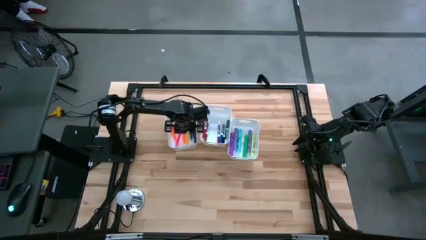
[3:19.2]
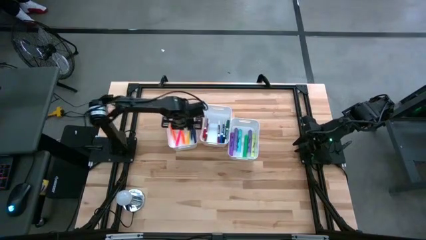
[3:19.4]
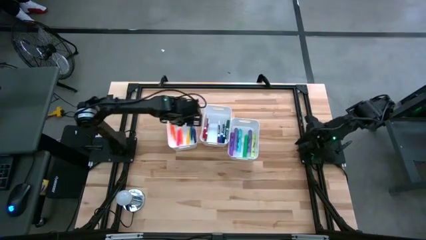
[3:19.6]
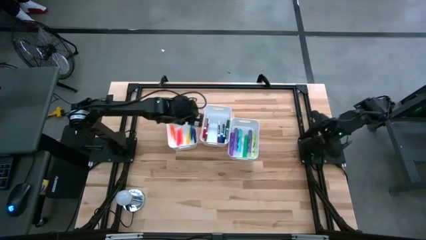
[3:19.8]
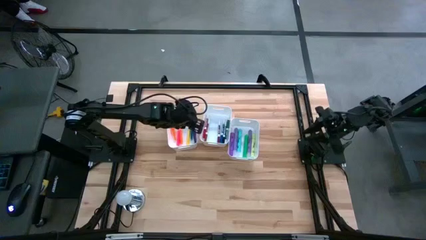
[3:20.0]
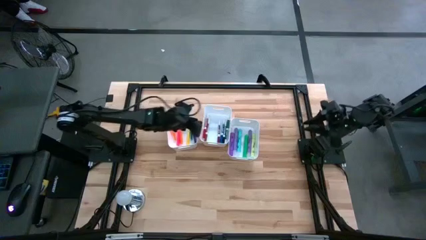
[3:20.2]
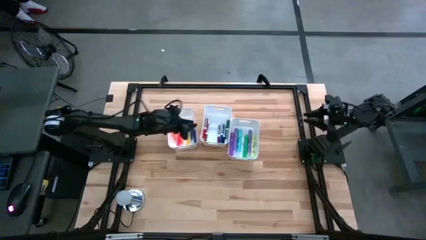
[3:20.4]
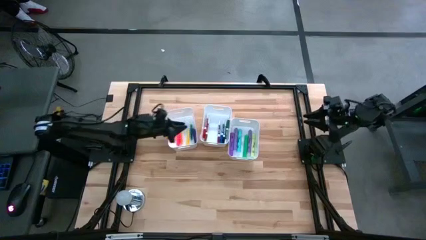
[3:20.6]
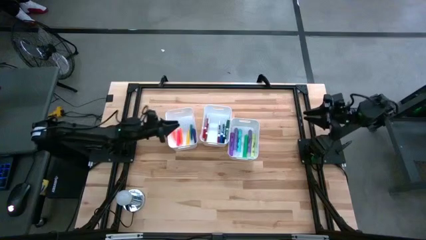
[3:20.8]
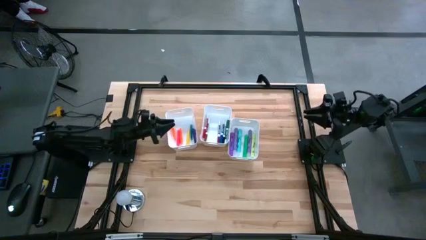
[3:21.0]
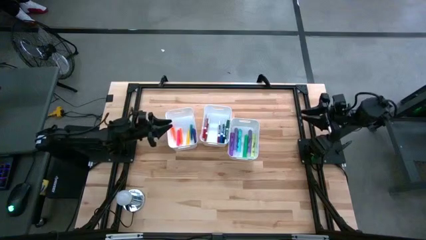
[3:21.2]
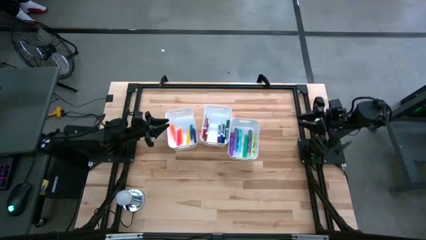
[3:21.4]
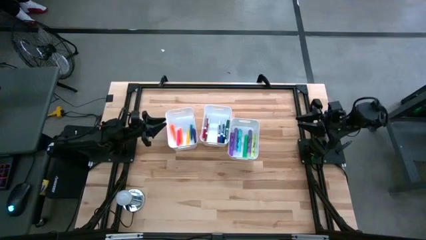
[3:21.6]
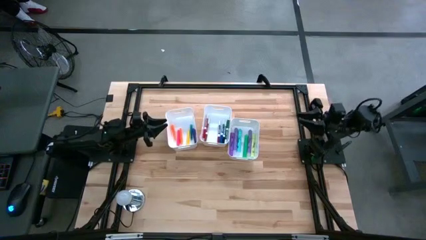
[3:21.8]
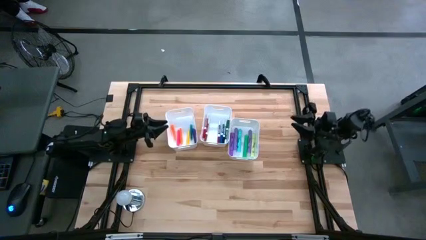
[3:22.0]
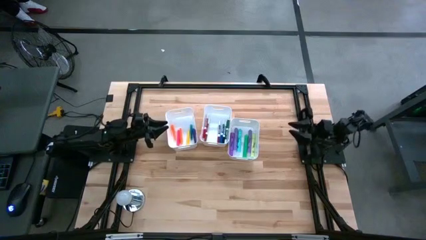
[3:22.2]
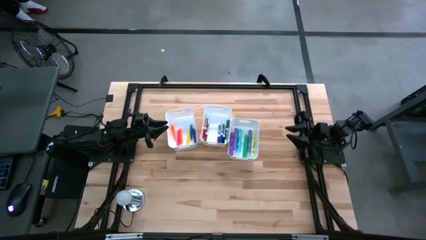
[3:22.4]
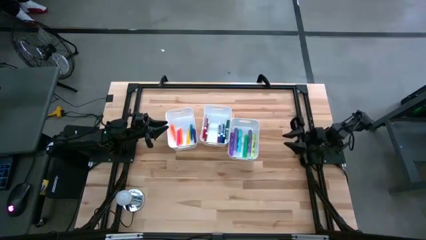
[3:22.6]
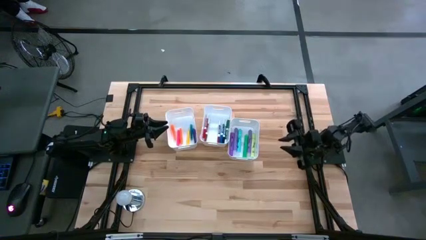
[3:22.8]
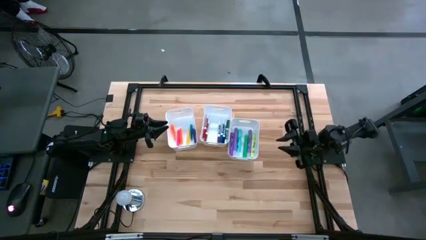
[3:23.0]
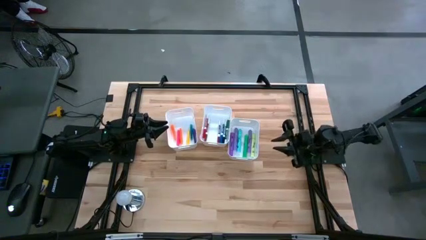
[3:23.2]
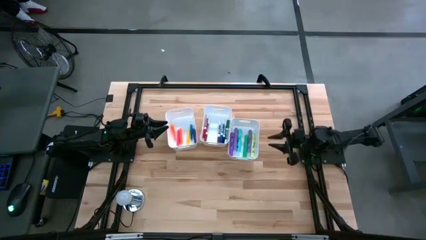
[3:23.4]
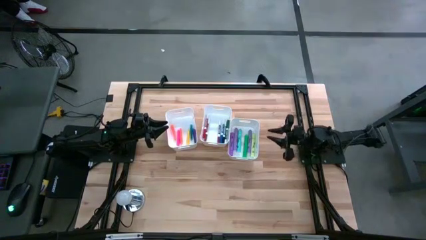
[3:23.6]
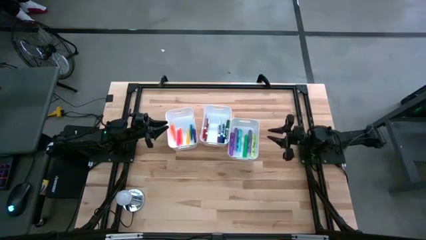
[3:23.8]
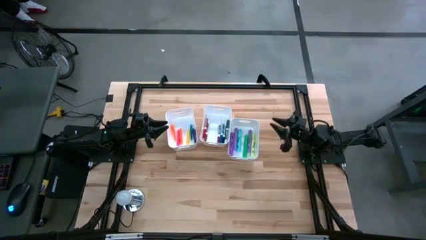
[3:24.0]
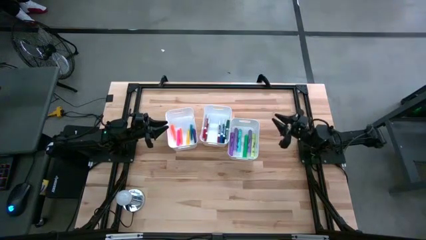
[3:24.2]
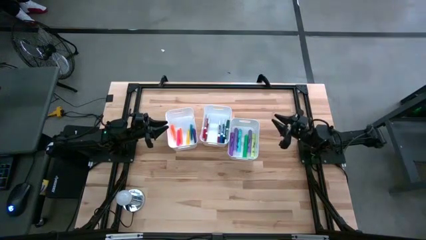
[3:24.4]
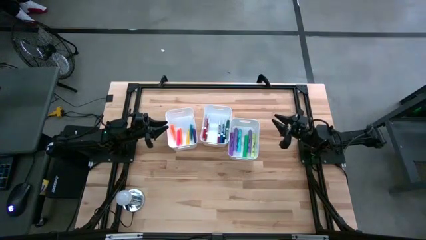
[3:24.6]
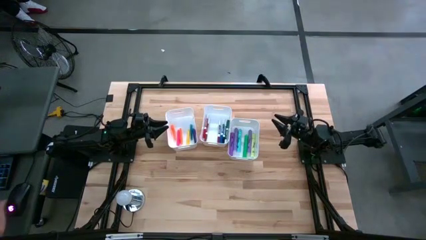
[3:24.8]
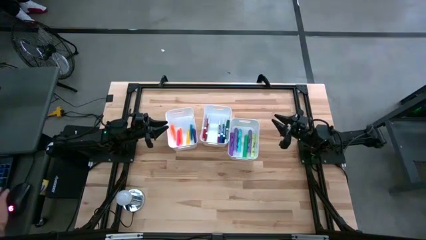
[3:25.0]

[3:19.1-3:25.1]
Task: Pick & Place Markers
Return to Home Position

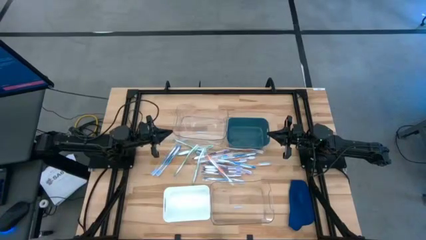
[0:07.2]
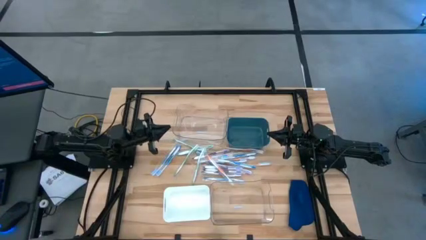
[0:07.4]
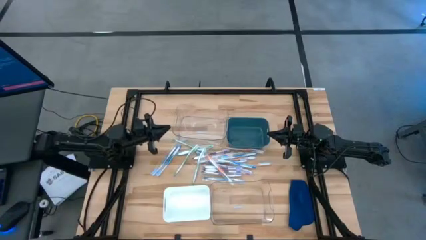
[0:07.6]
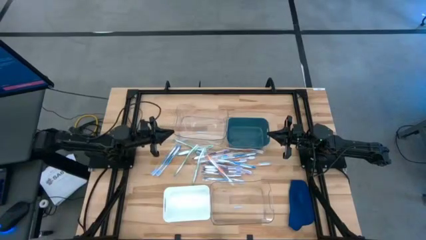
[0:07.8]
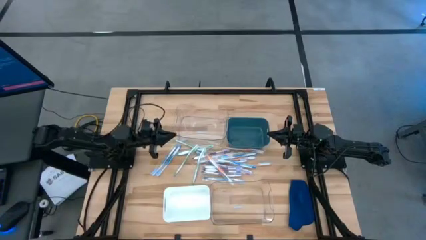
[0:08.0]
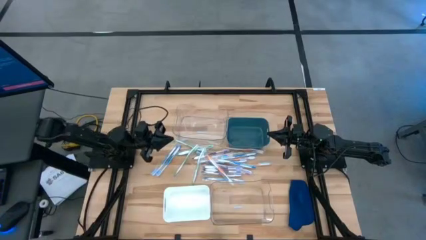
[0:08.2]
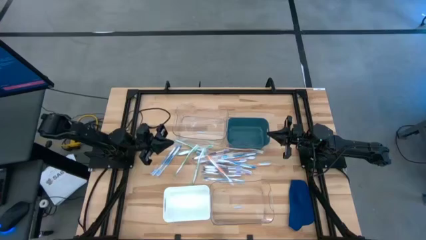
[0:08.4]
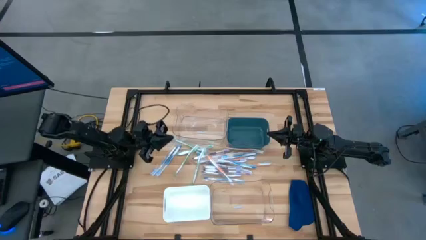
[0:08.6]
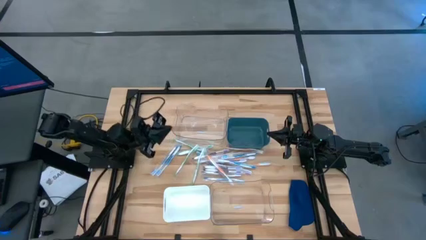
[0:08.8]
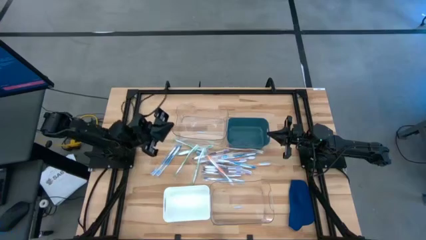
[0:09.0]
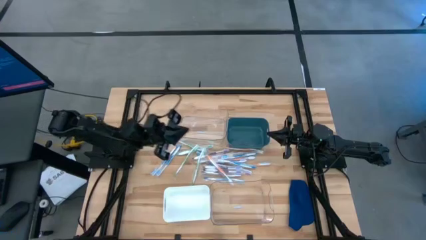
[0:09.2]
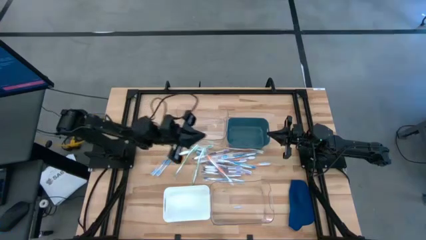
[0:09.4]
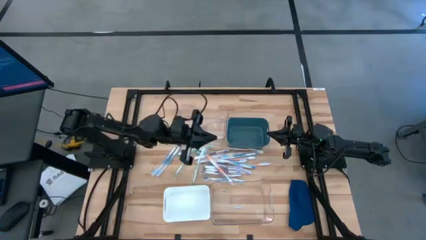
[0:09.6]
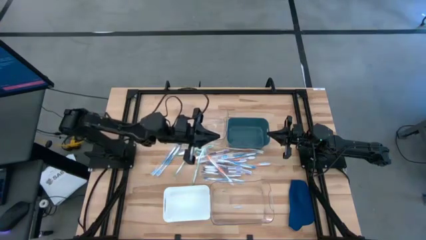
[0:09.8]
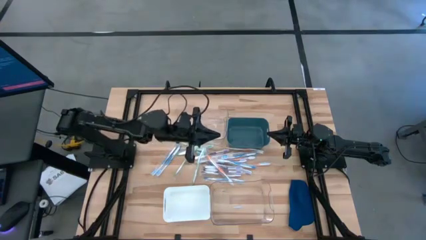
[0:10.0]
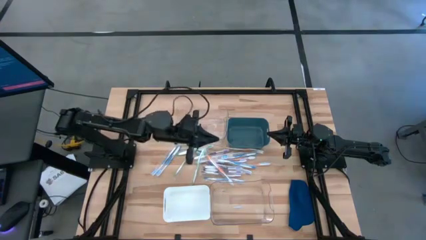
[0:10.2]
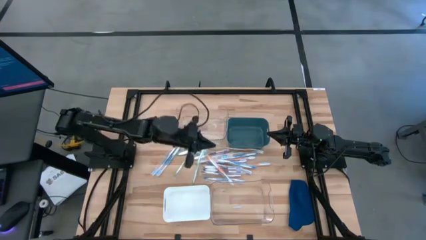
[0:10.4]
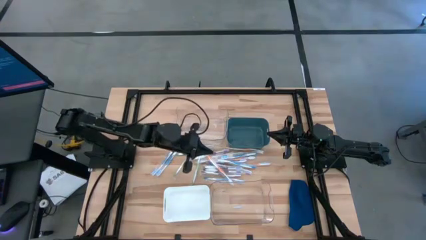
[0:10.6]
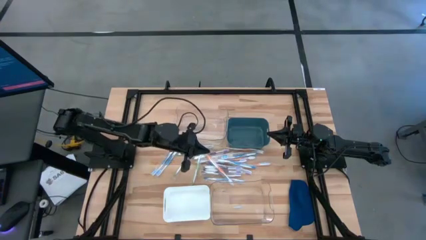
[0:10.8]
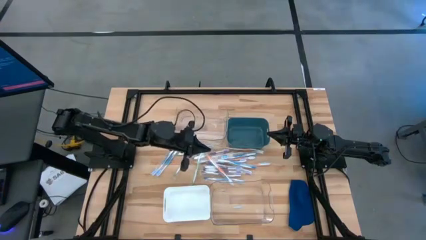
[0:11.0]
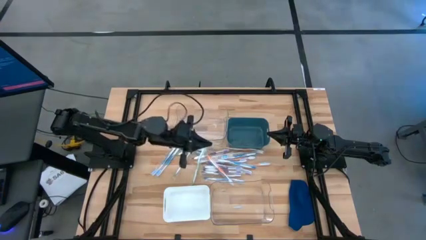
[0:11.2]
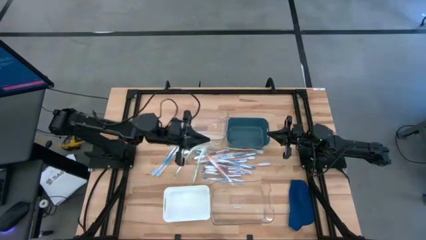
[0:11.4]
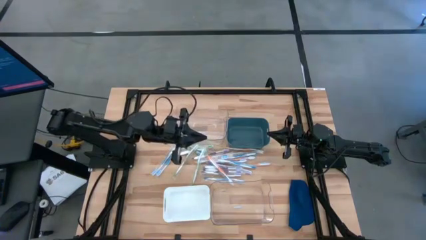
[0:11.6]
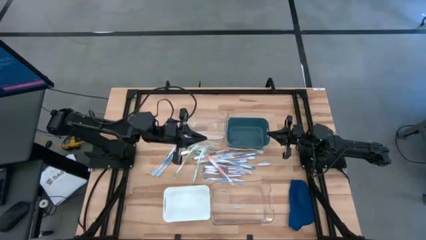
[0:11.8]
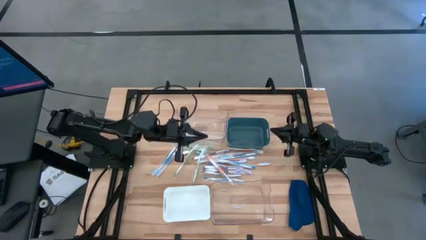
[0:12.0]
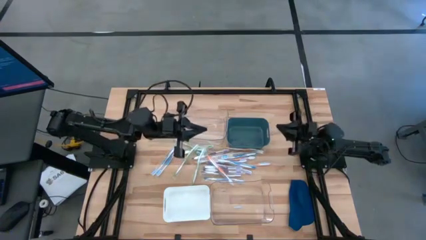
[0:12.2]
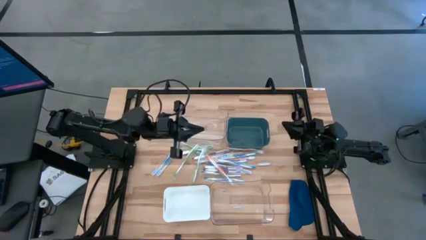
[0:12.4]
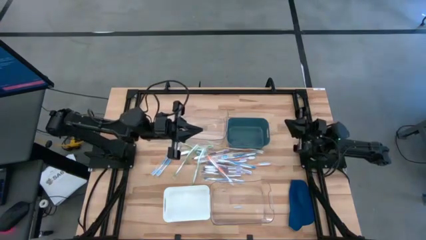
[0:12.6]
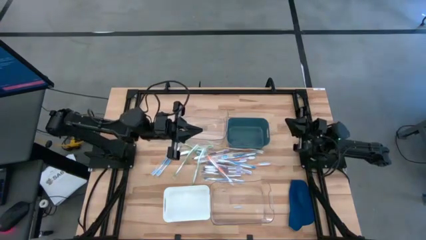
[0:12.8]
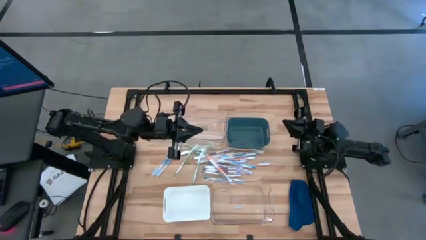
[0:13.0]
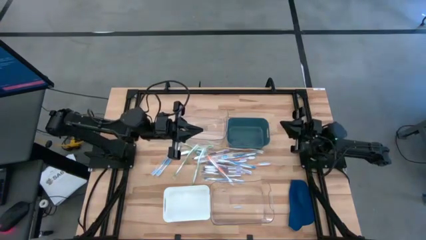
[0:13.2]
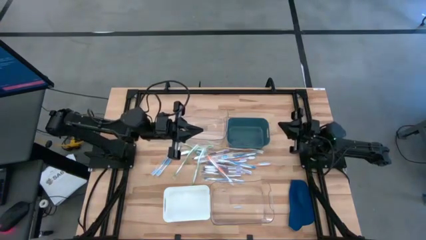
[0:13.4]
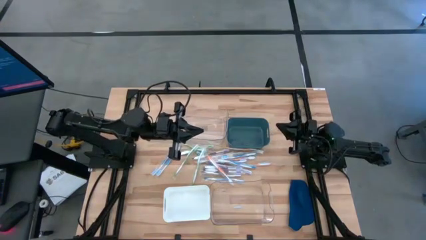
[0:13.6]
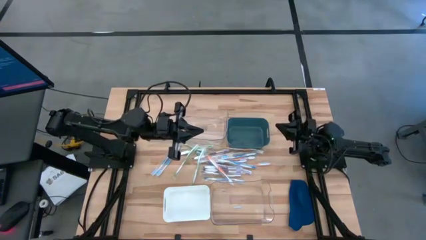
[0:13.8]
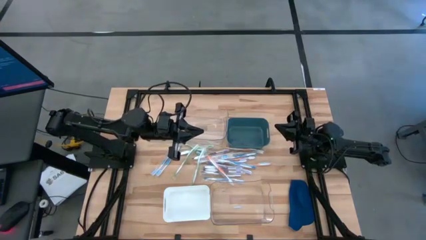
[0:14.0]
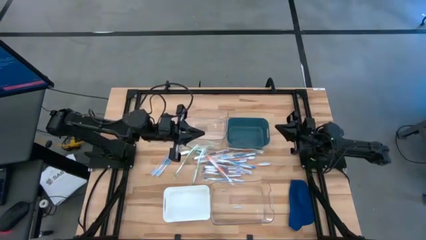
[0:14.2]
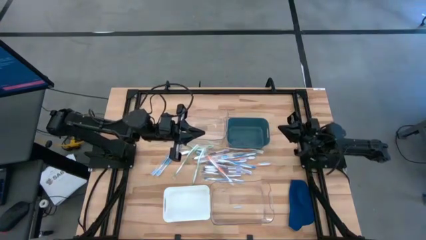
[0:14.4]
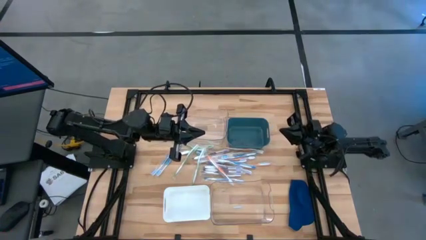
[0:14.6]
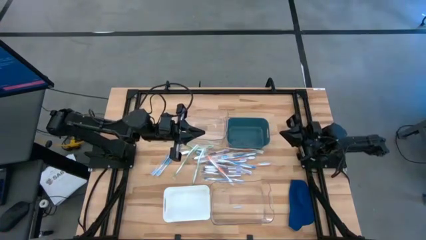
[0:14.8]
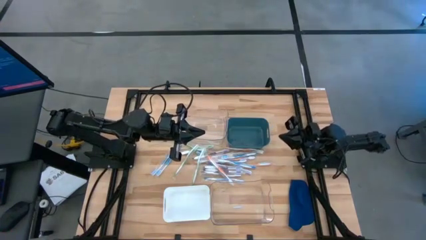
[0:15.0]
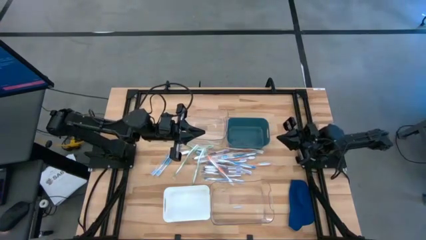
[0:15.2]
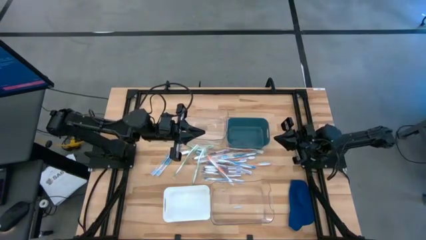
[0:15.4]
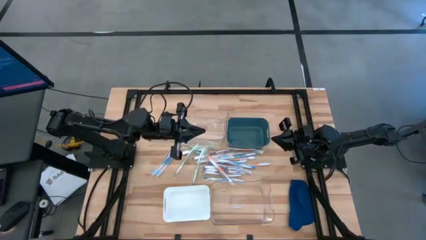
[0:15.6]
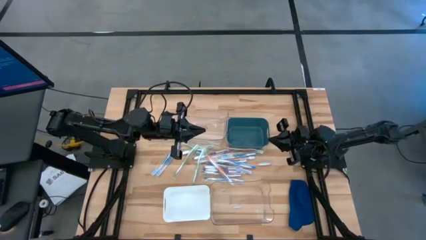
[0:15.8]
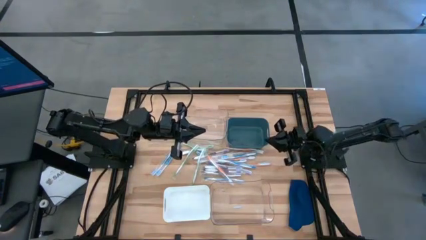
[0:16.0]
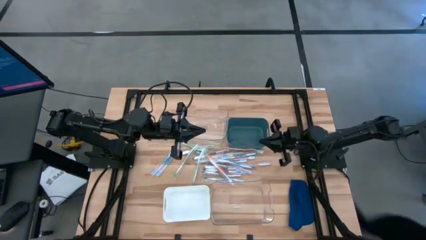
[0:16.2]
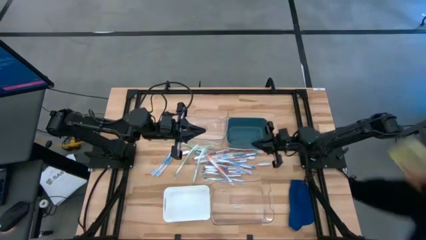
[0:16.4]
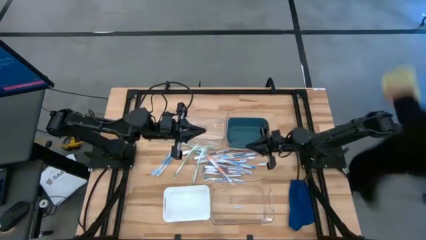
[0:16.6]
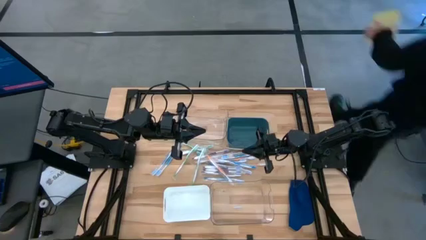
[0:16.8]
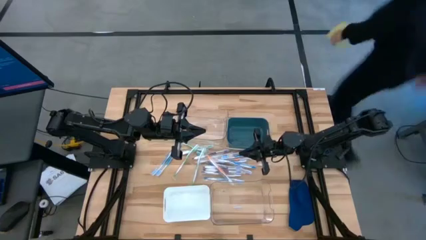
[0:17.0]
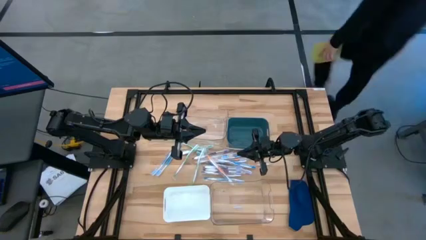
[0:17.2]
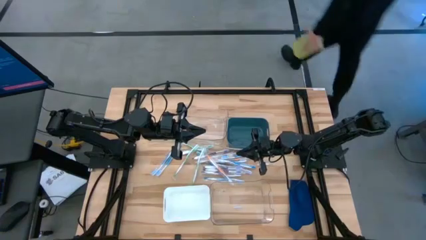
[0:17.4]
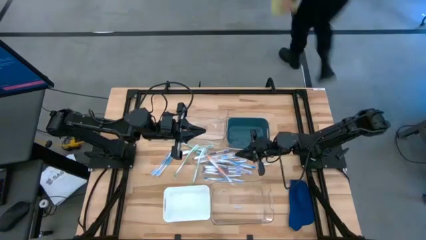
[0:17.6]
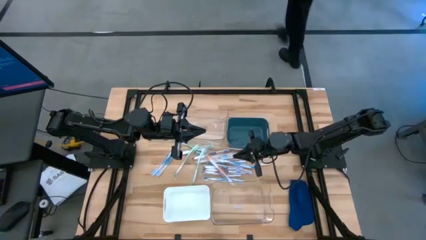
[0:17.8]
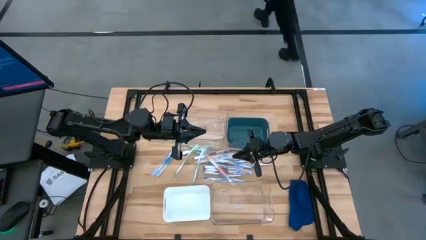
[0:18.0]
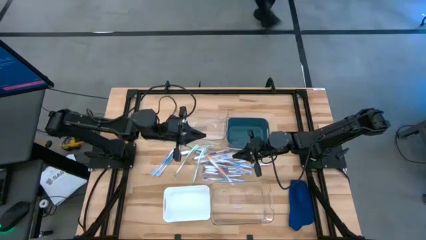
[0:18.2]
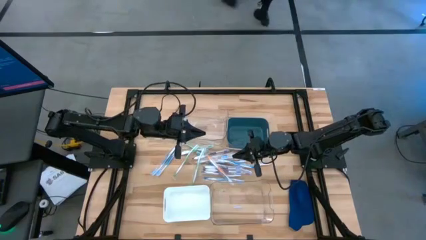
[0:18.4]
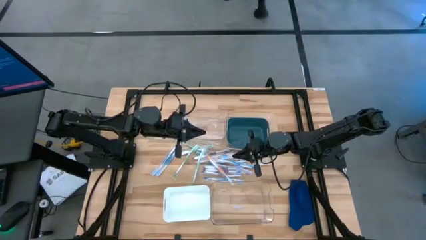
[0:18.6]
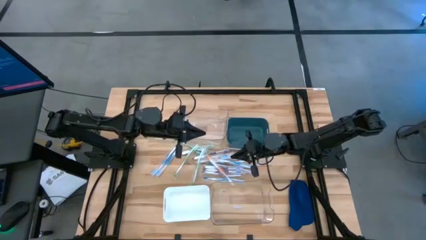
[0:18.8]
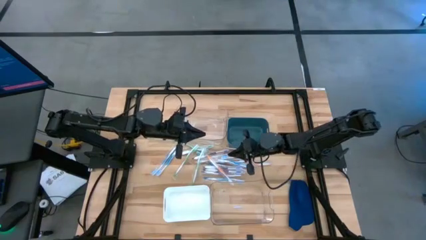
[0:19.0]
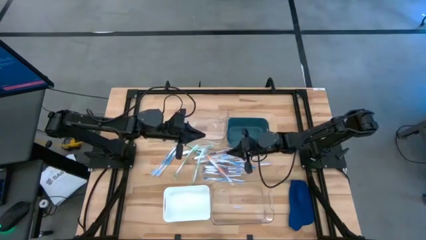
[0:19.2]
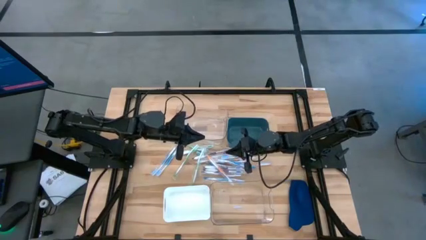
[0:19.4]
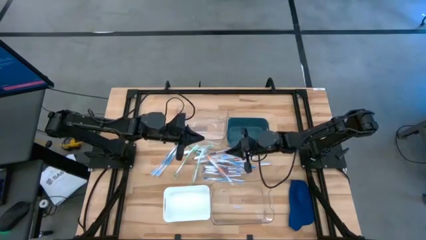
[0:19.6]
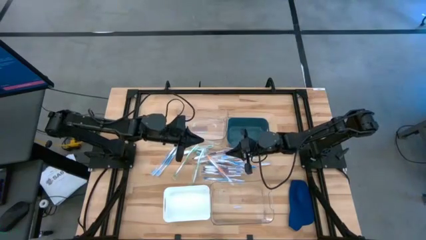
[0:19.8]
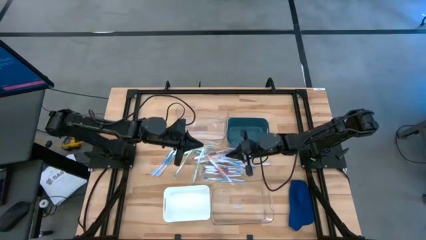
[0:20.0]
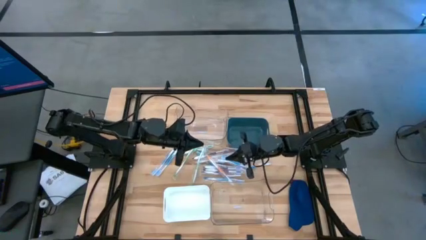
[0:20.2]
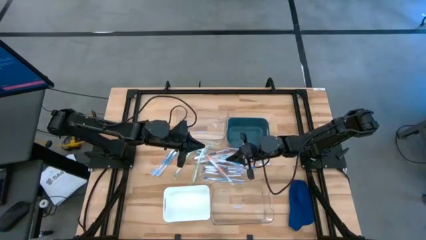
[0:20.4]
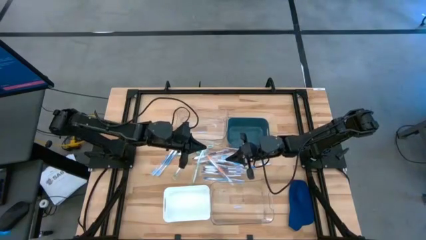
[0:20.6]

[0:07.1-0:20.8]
Task: Pick & Place Toothbrushes
Put the orange toothbrush into the white bin
